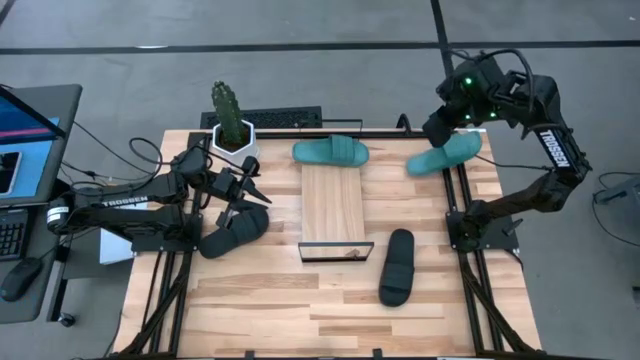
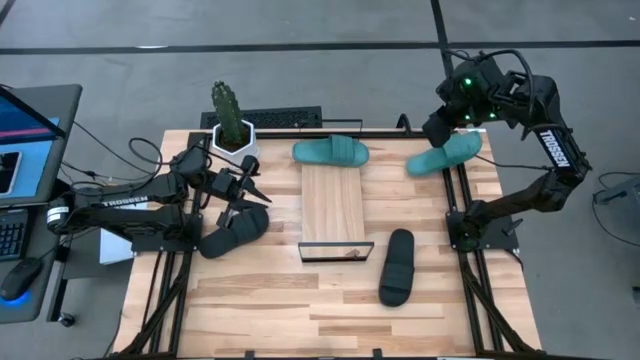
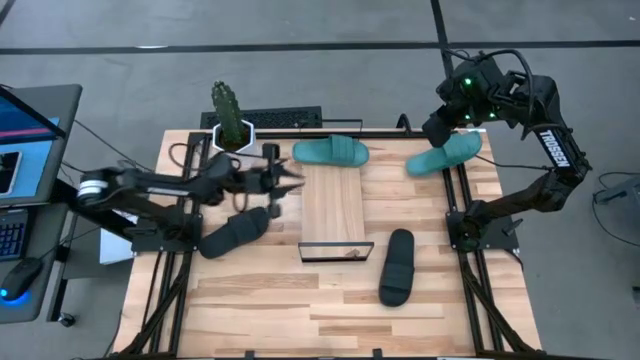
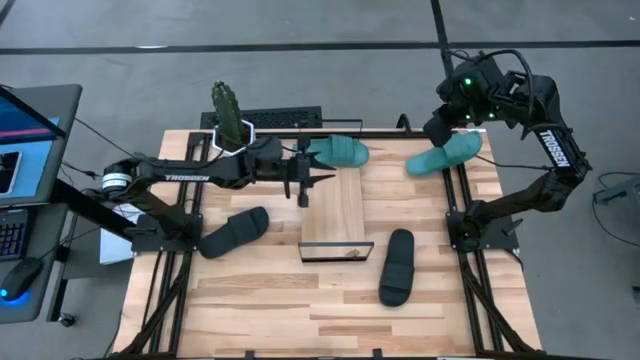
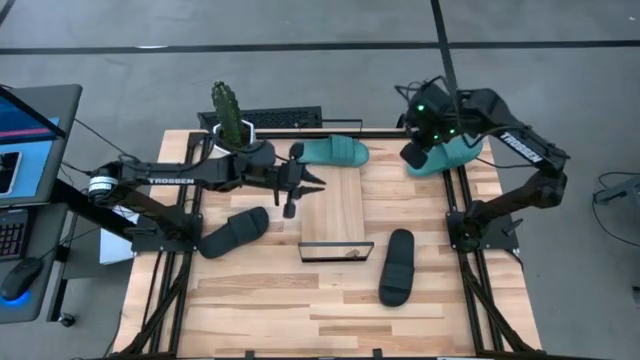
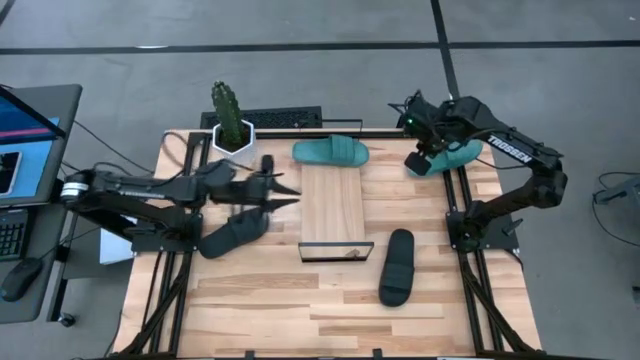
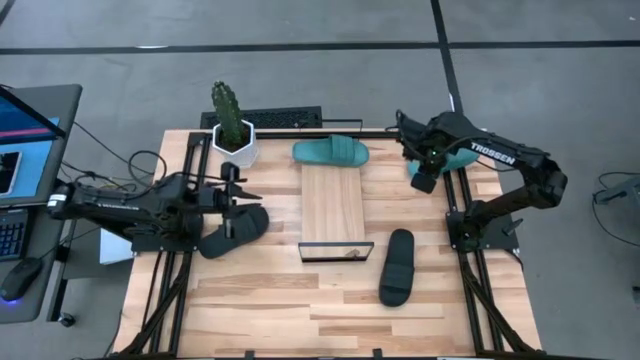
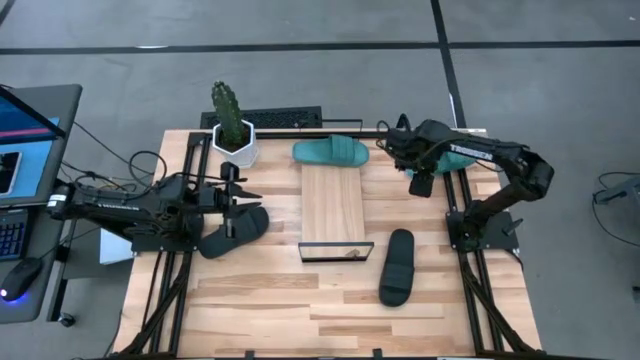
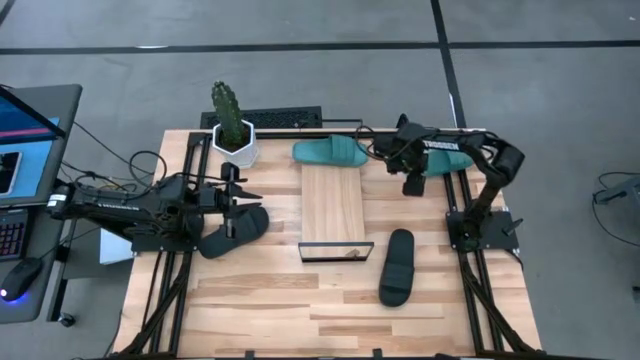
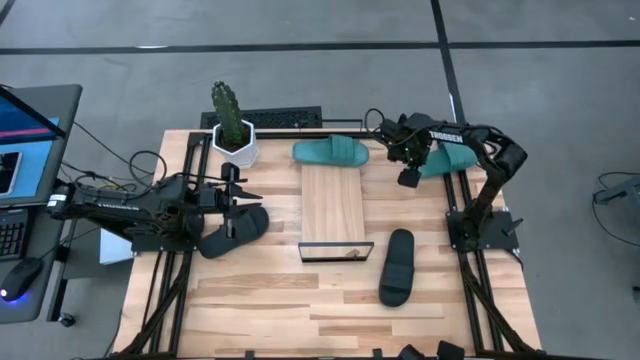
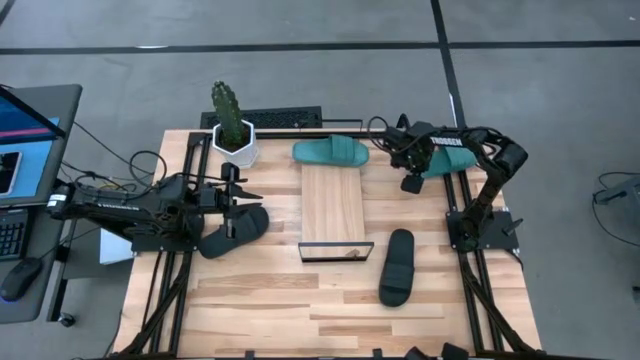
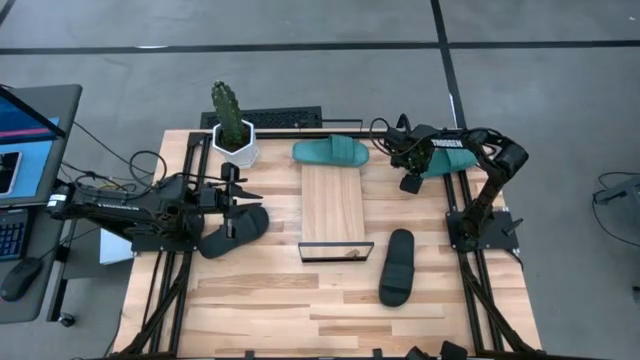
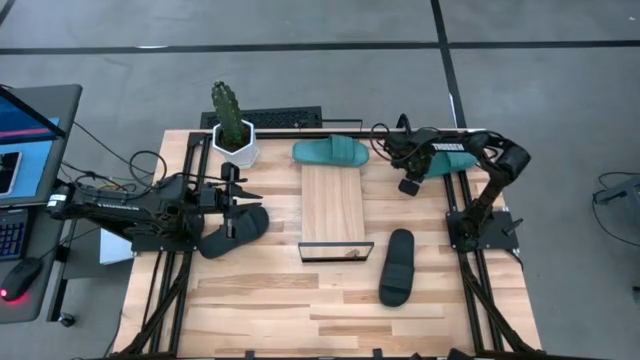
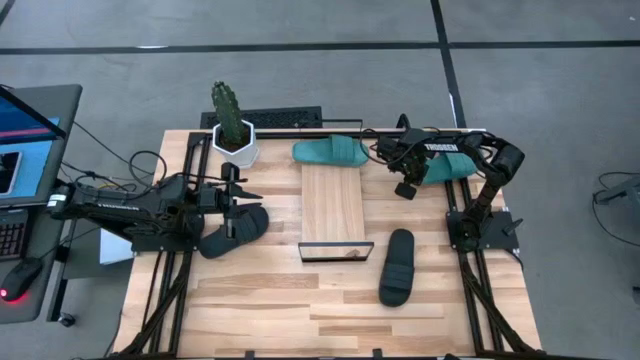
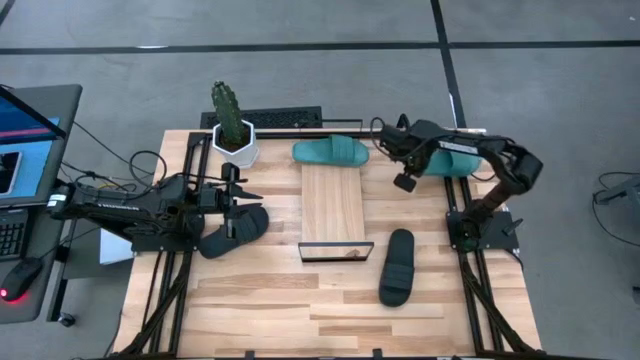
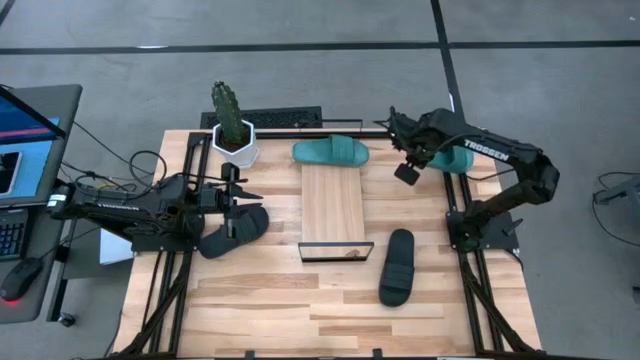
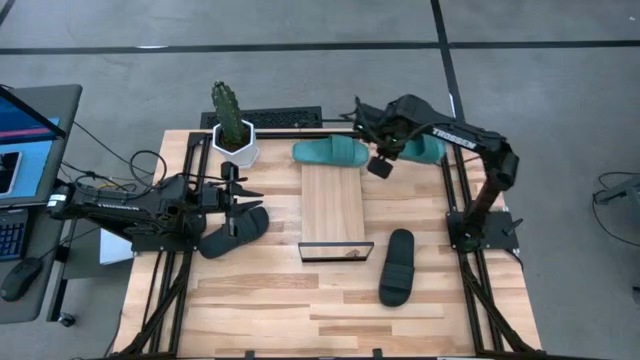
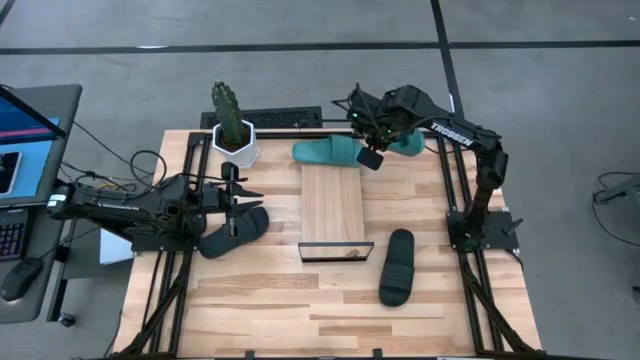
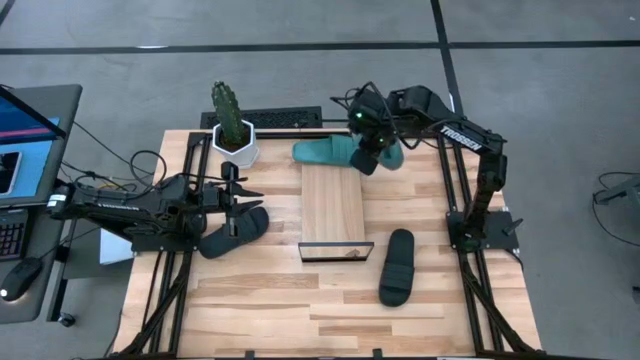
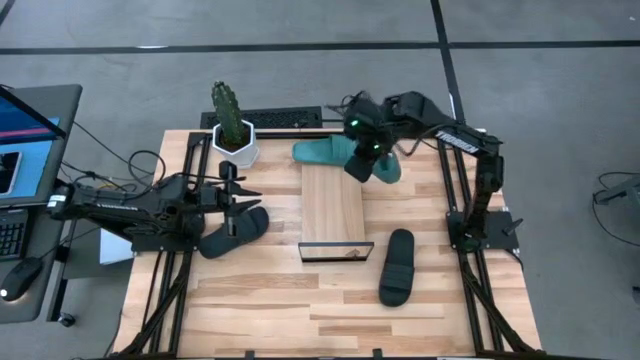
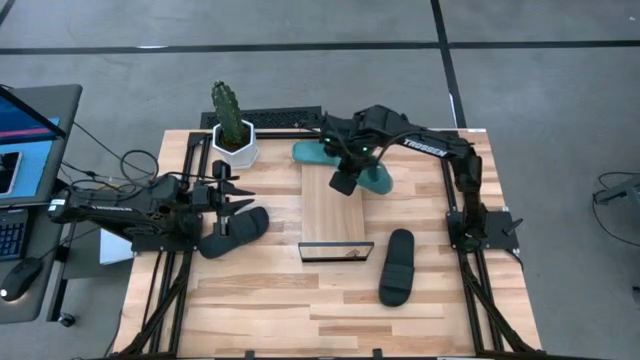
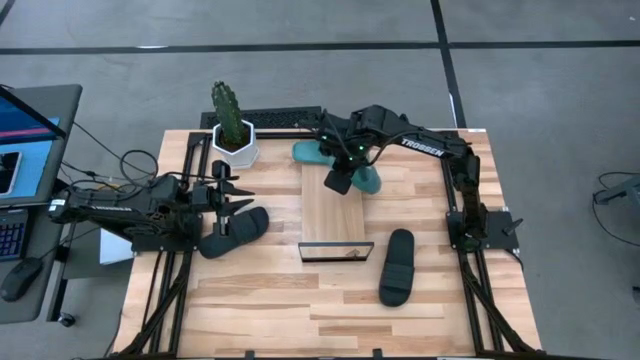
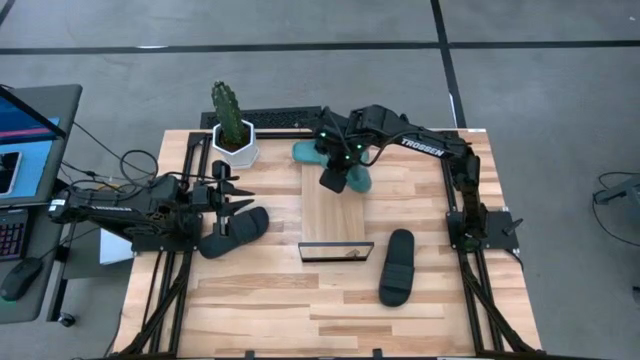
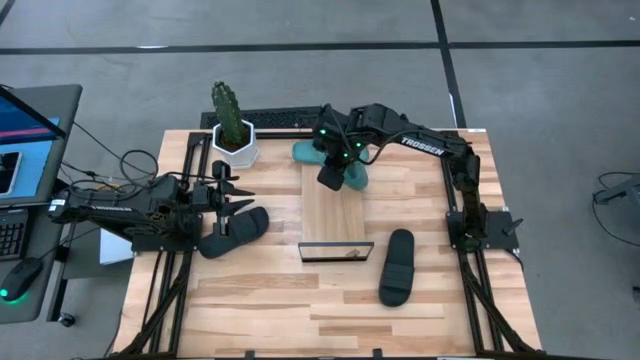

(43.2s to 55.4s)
Task: Pick and place slides into the shelf
Put the green slide on the shelf

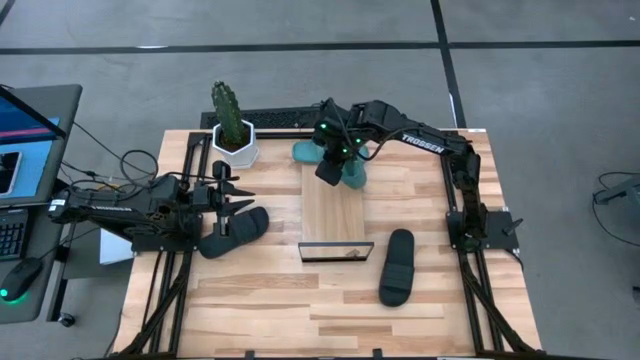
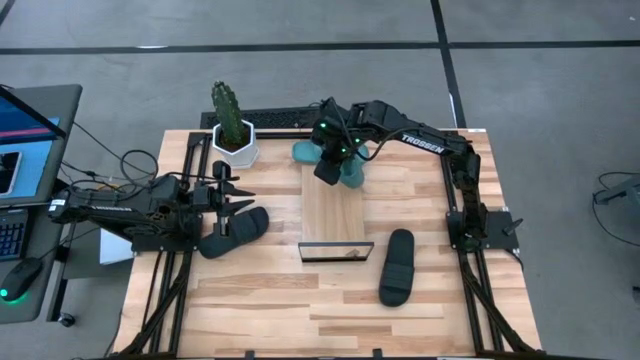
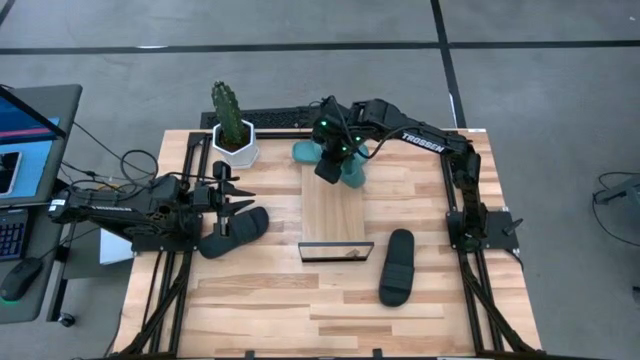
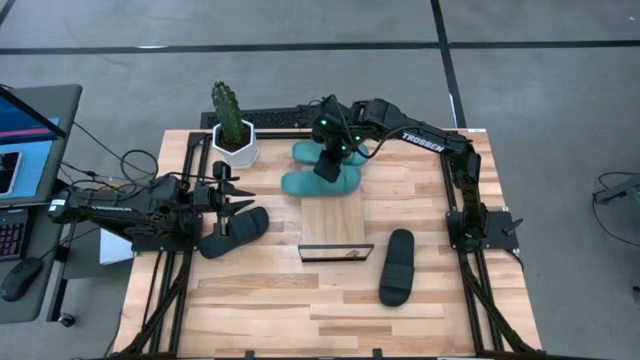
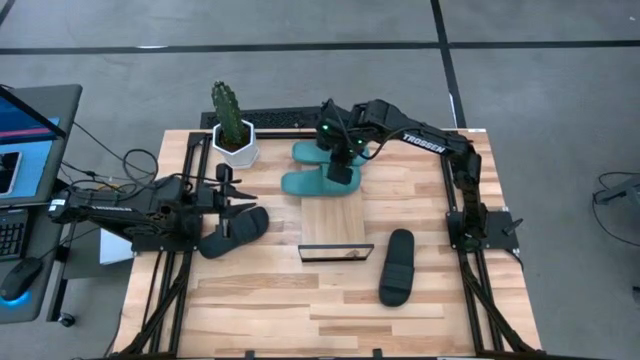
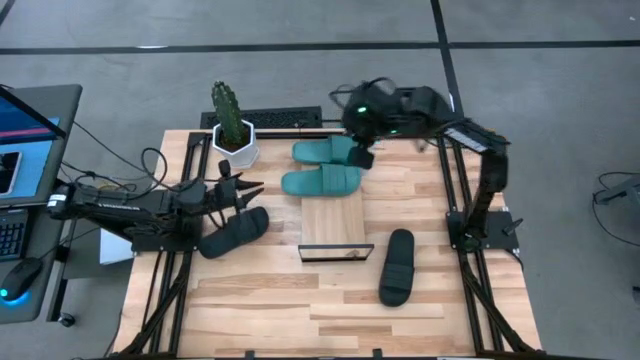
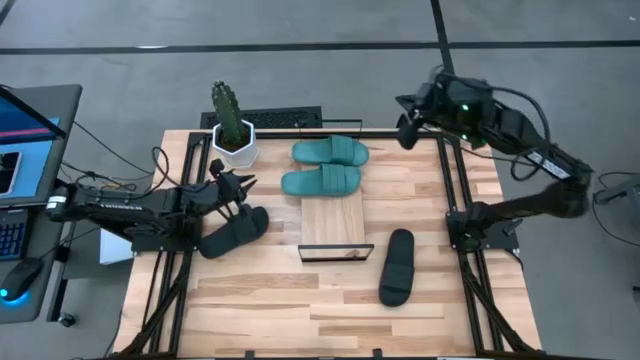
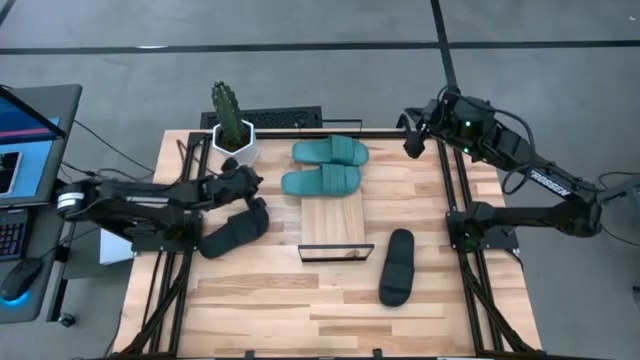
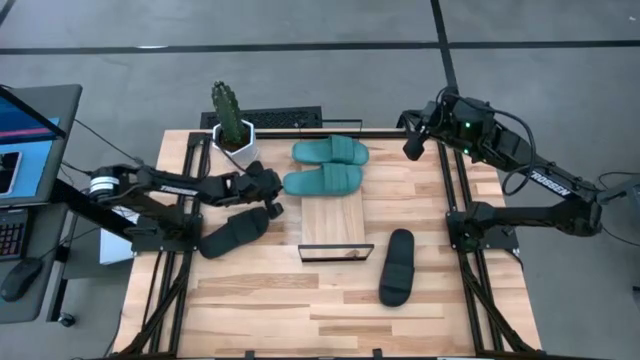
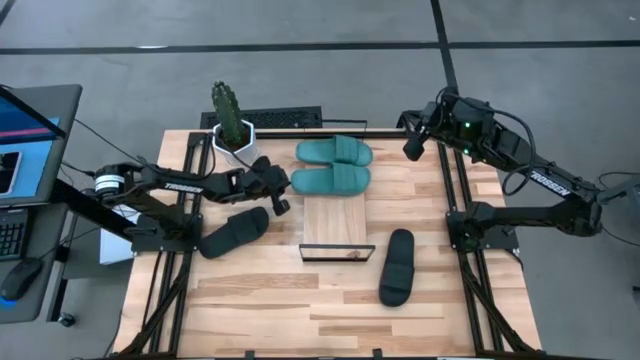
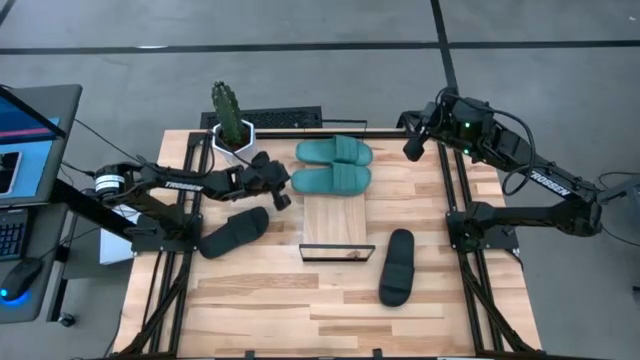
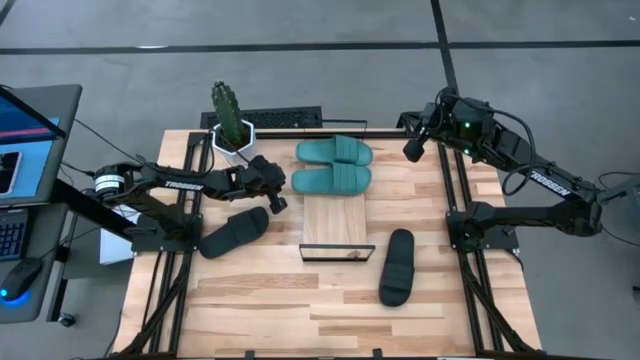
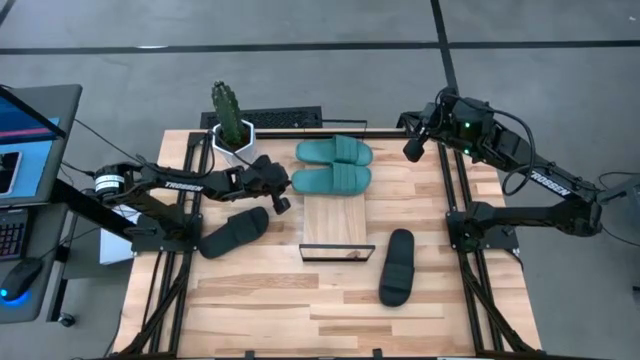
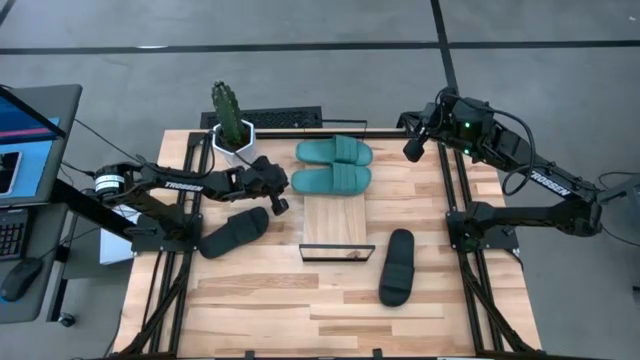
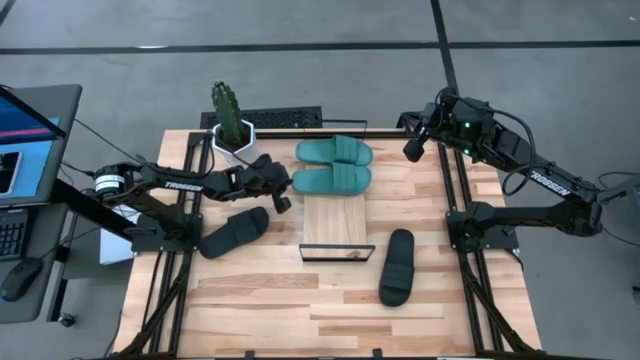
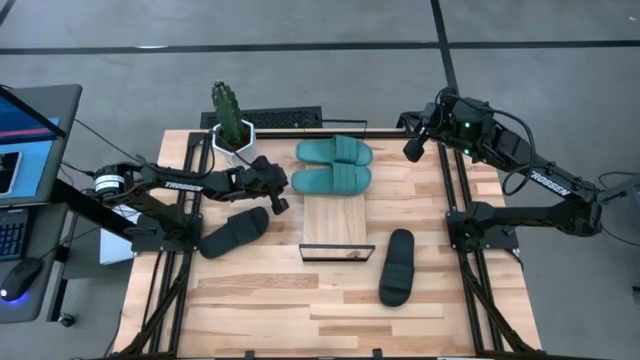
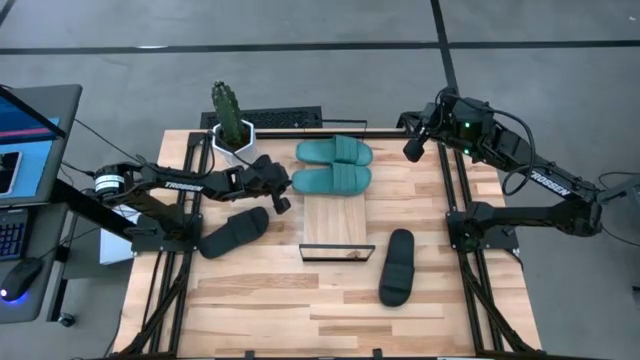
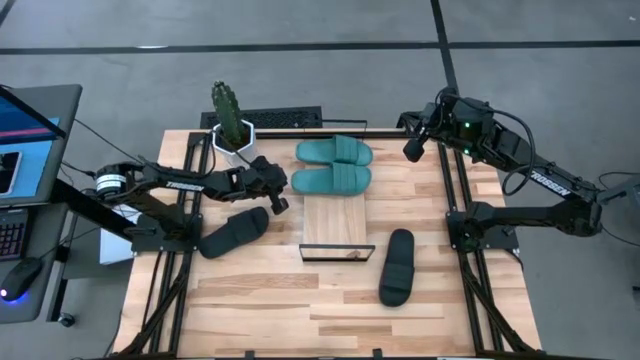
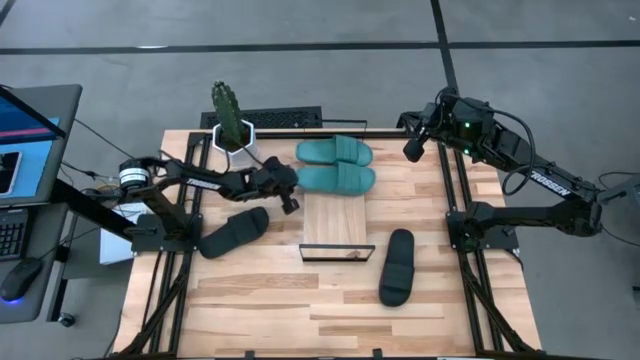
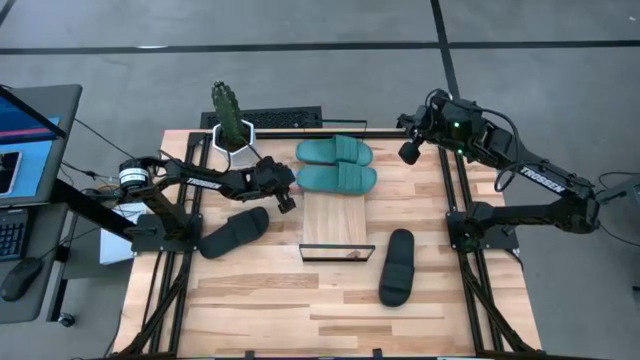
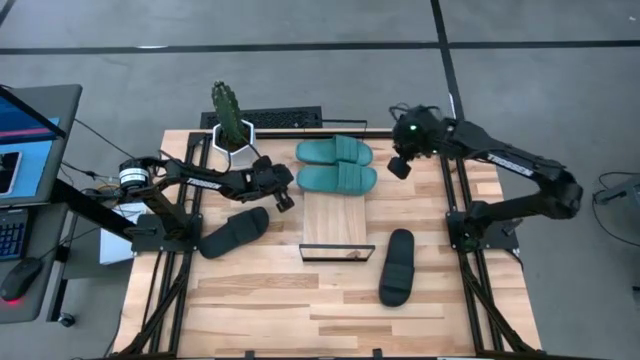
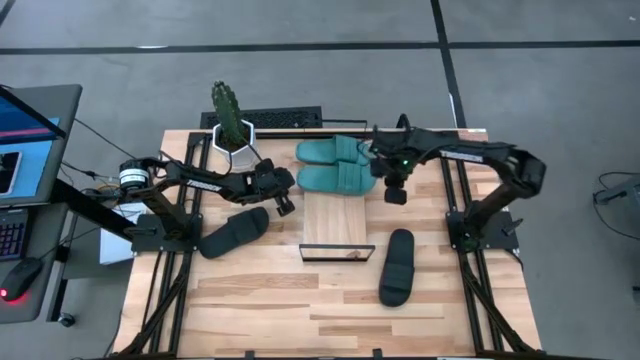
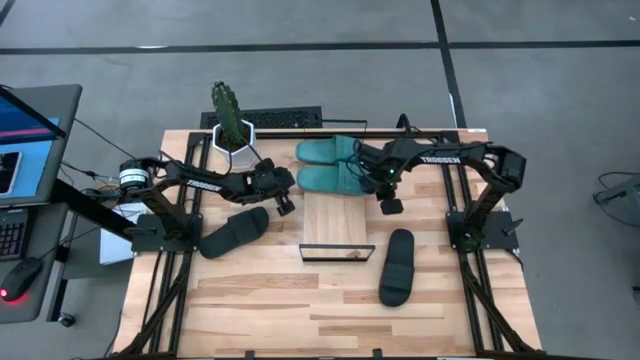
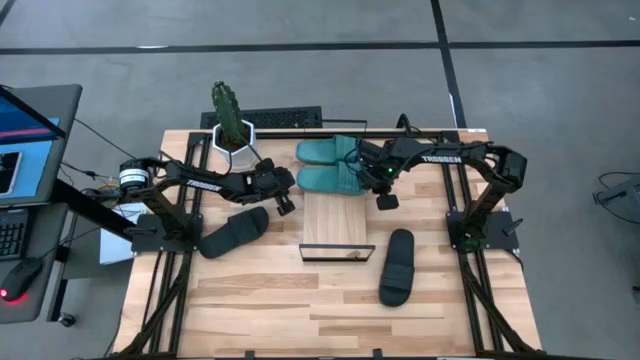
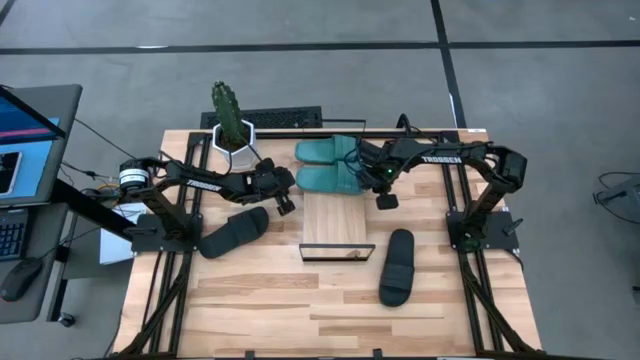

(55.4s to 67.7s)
Put the green slide on the shelf
